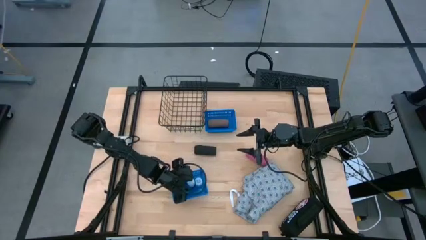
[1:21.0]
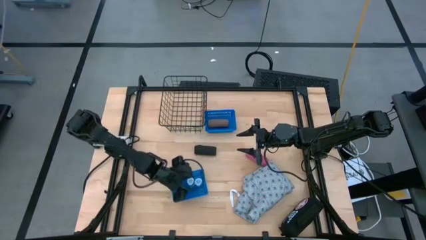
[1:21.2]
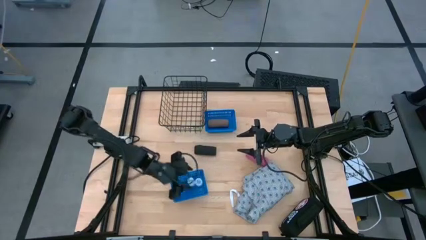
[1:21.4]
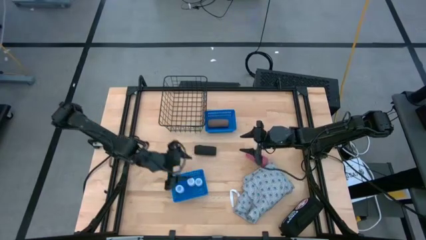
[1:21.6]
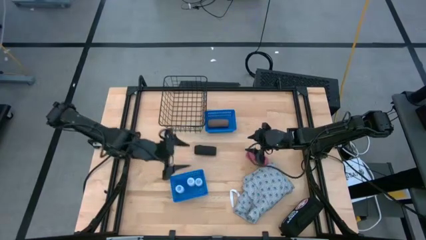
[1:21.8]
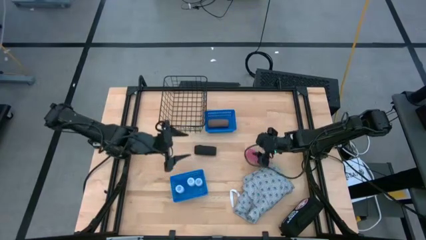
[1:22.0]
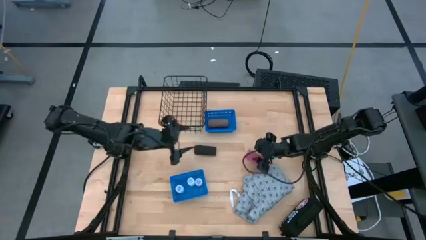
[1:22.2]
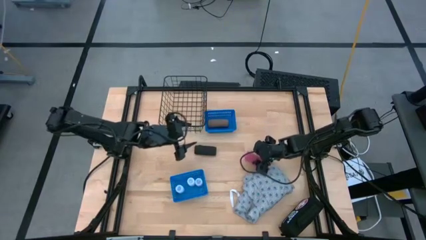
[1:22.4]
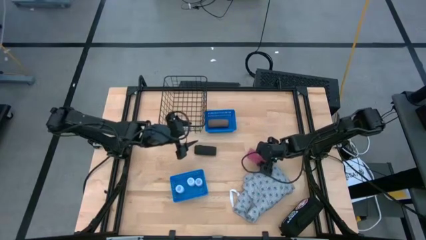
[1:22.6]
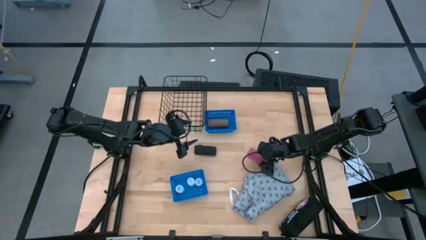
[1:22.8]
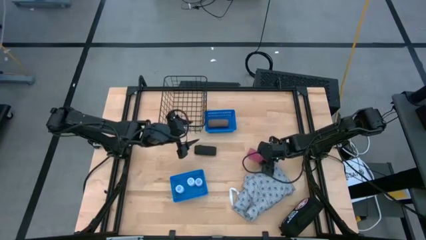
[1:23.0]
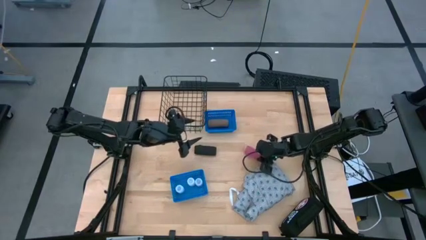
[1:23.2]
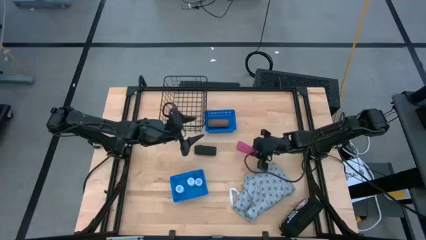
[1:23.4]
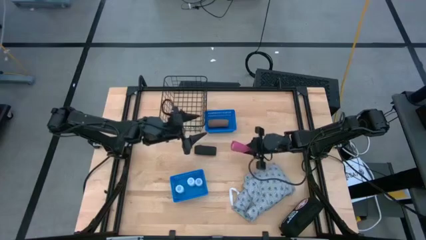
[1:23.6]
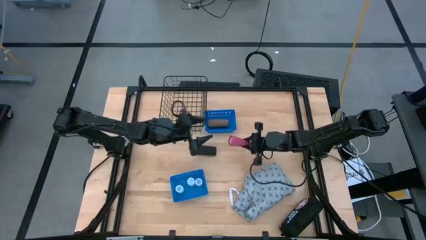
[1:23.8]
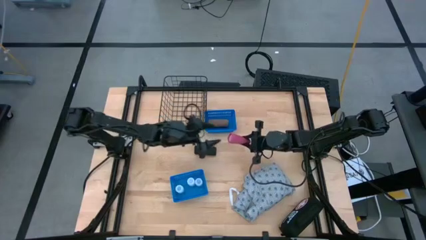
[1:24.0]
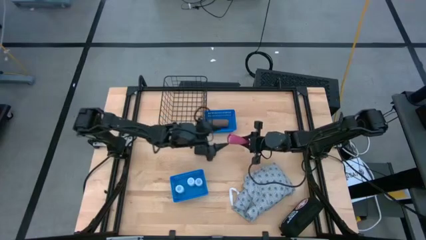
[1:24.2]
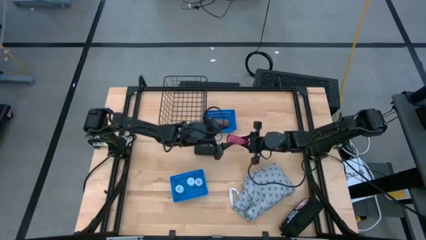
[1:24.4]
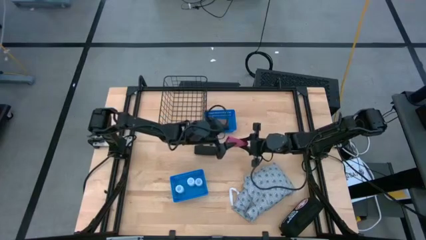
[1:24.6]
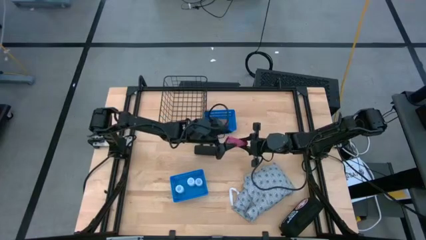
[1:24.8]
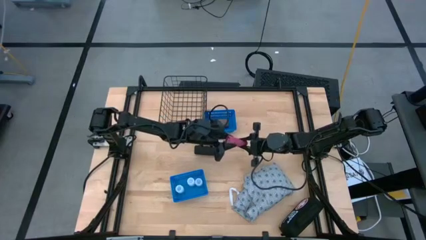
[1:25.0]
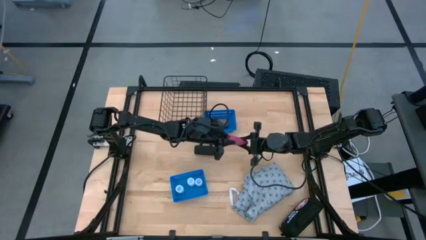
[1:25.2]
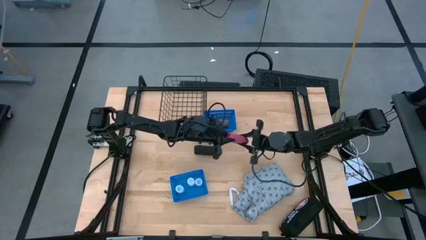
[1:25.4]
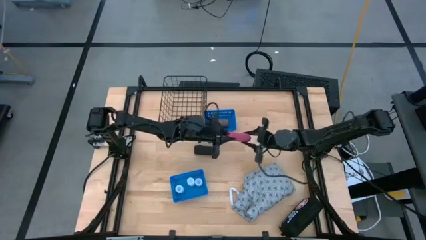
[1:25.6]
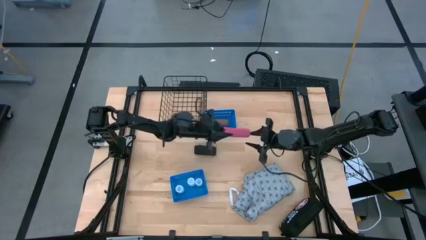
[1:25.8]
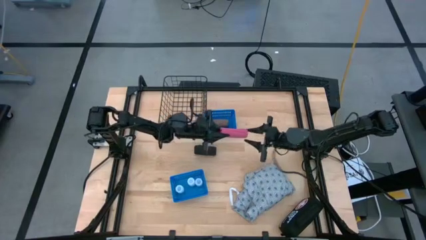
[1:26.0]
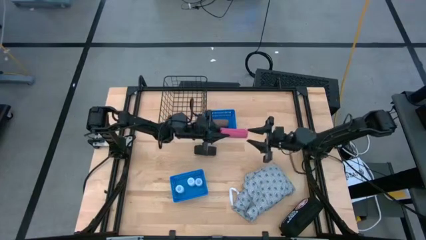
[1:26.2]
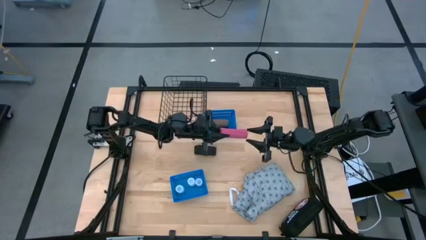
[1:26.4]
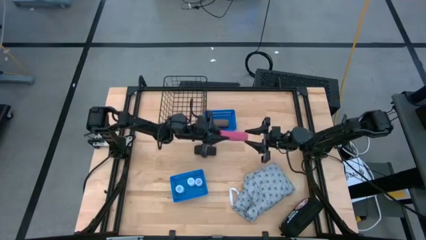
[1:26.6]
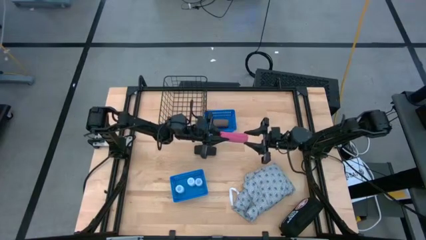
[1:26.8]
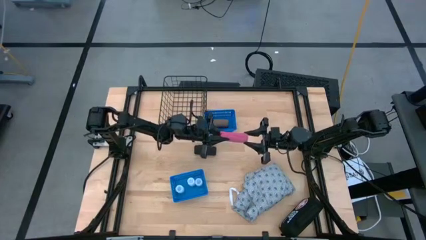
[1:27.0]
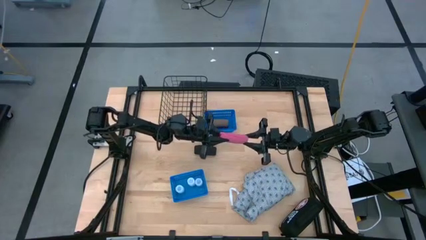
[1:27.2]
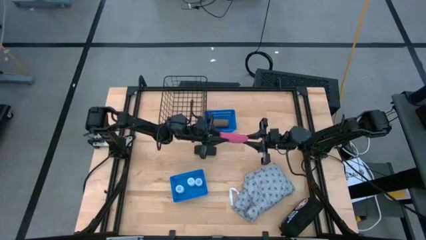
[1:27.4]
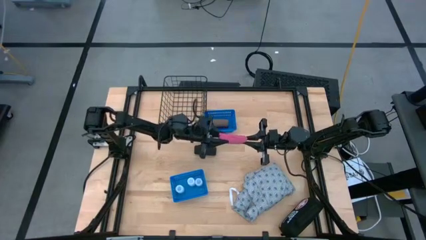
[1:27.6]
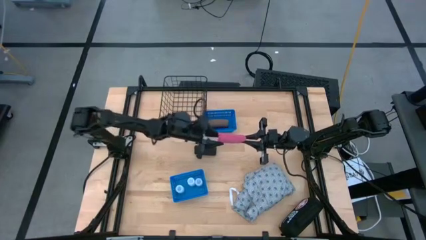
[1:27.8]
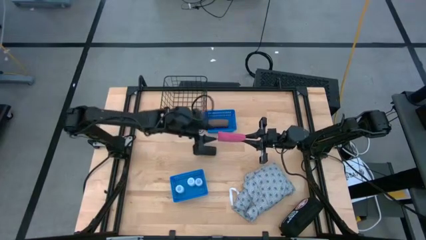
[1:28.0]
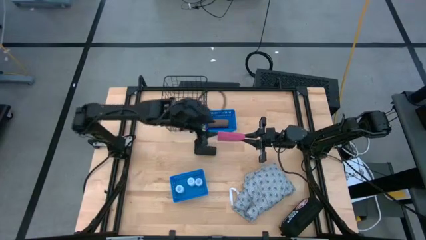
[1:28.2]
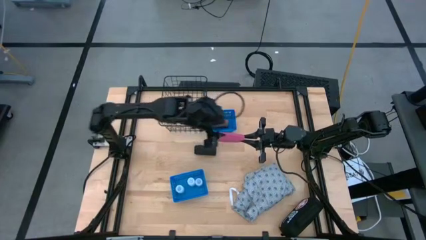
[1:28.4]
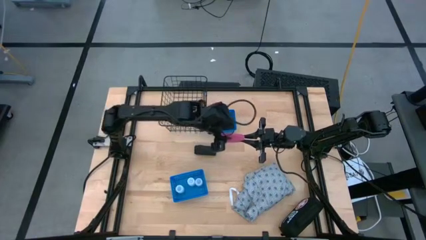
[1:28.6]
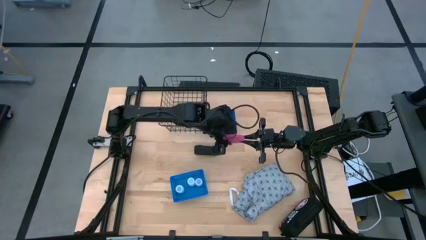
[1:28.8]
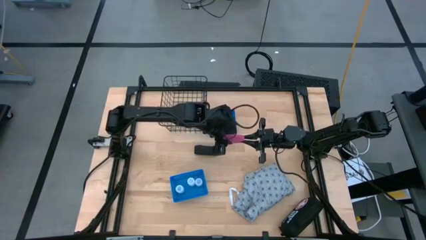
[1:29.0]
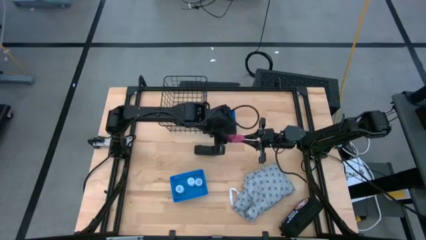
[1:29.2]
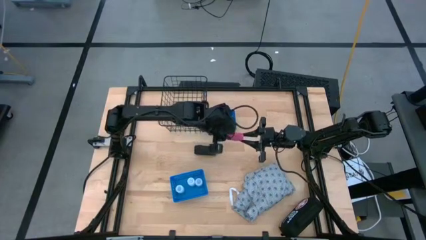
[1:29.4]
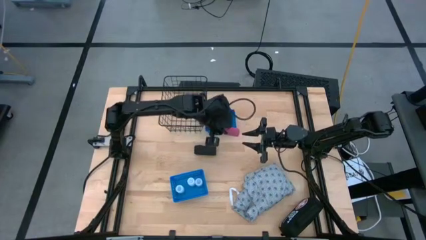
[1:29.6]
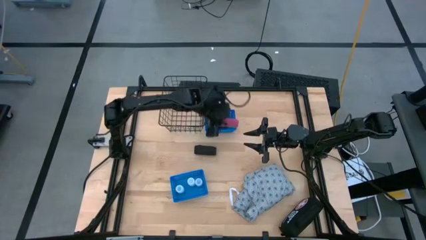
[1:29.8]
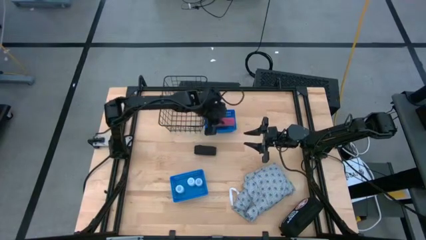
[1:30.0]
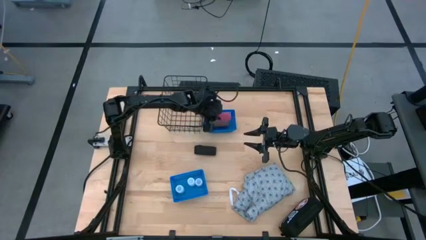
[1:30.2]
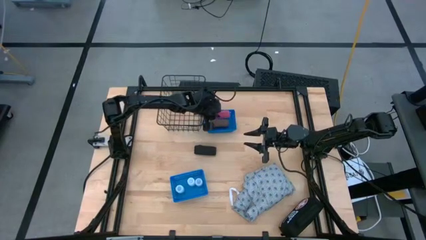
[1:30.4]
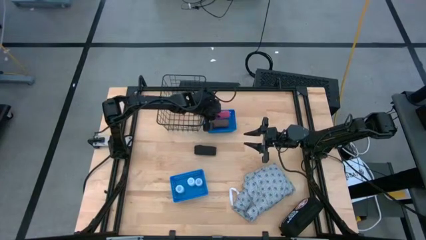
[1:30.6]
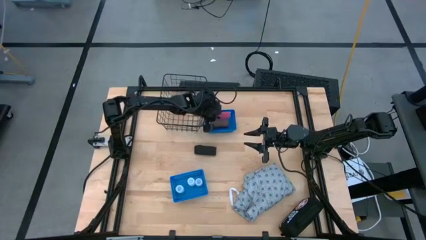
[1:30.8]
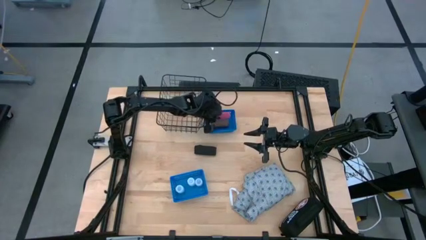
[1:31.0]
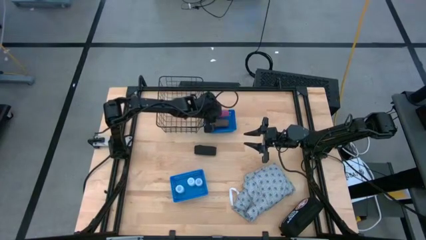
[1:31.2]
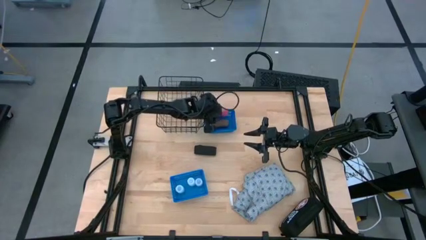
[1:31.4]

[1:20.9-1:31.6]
Task: Pick & Place Medicine items
Put the pink bandage into the top blue basket

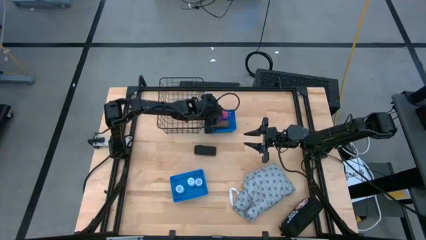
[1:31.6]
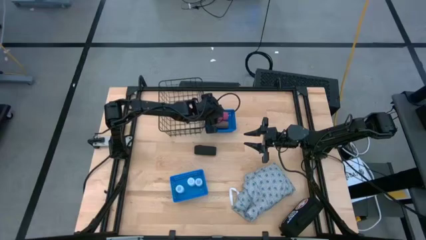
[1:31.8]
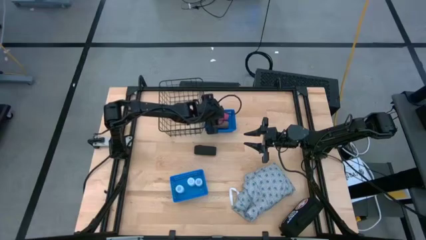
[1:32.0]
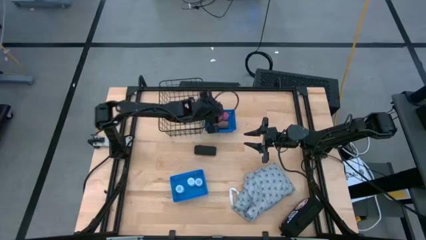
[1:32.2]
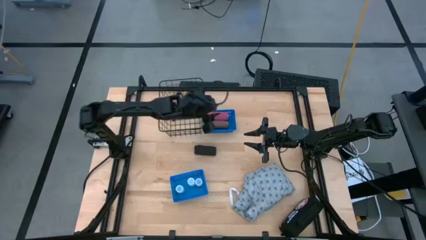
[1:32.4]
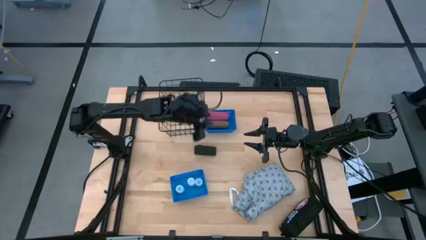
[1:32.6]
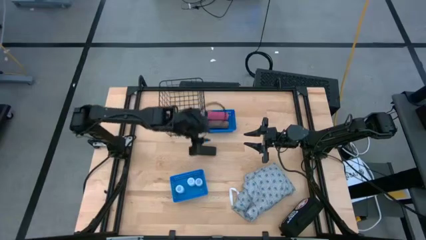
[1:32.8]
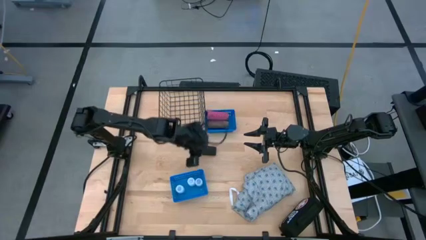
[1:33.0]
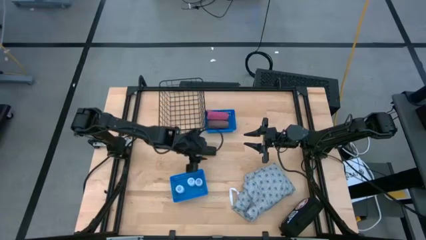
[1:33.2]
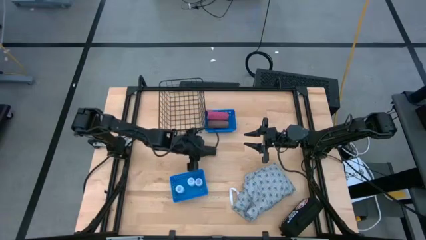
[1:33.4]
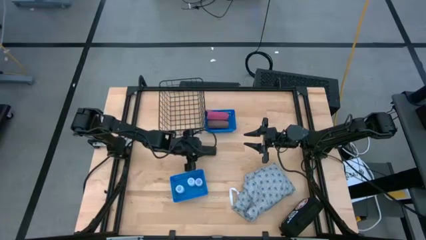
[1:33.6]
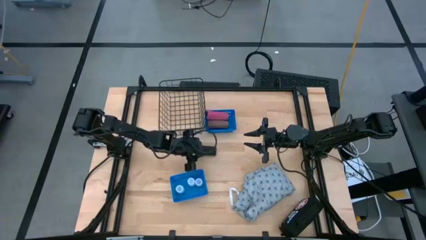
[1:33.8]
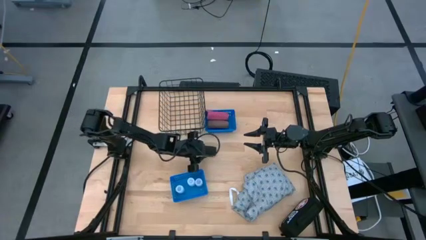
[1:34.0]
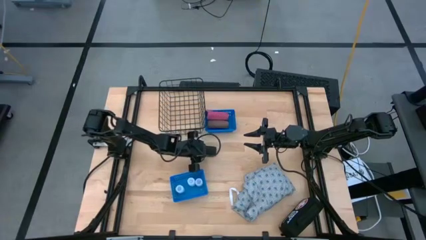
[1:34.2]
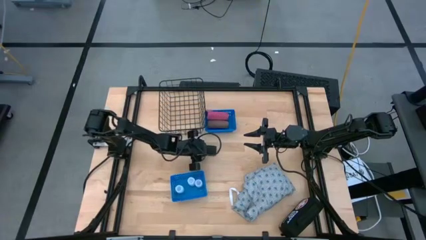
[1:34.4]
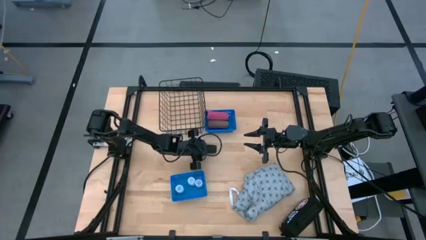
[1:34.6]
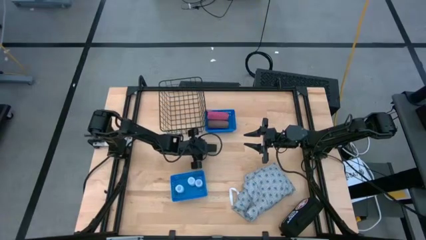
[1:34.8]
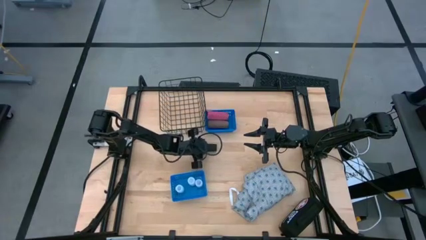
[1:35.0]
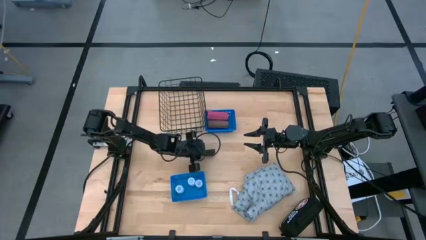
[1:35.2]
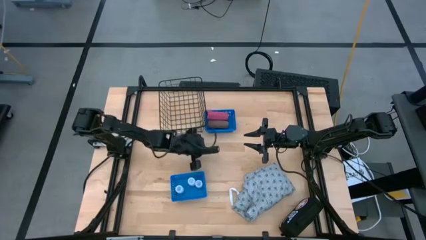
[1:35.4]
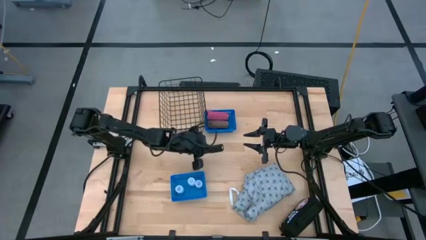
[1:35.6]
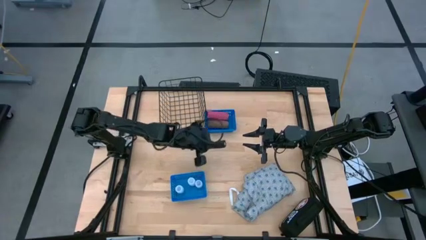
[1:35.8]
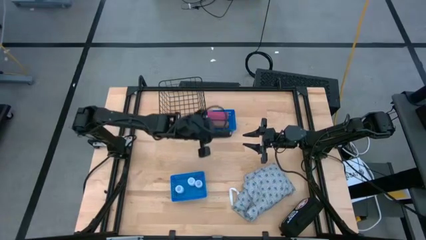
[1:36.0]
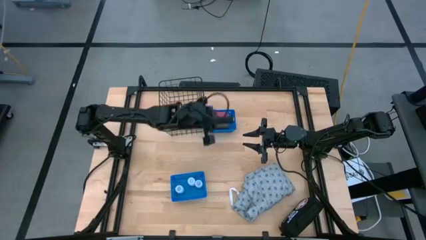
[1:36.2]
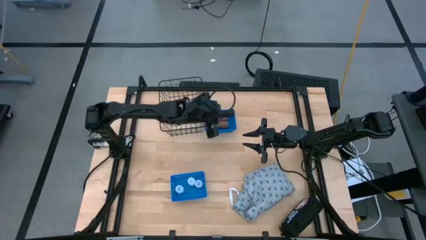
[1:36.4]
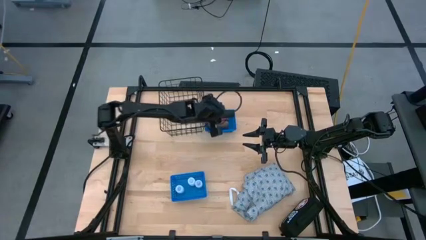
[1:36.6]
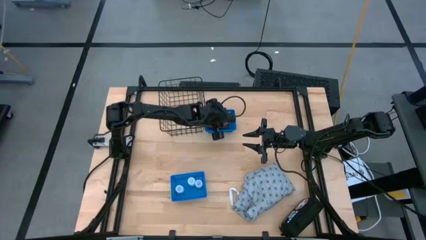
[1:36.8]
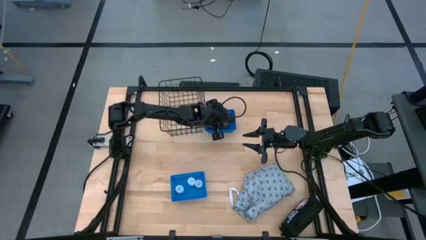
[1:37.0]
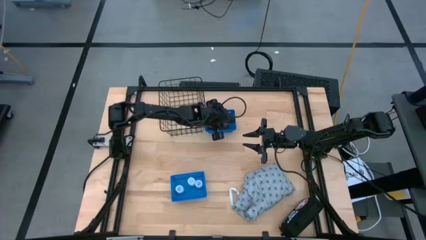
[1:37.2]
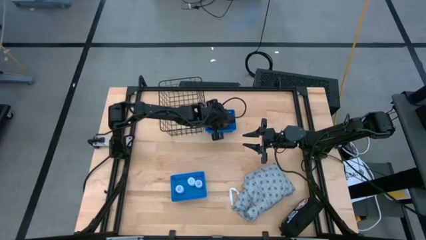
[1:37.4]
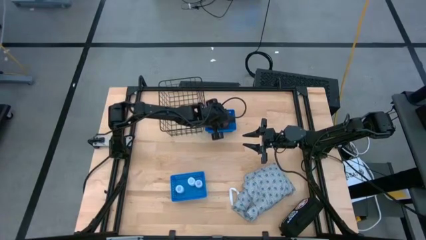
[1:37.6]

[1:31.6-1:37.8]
Put the black bandage into the top blue basket
